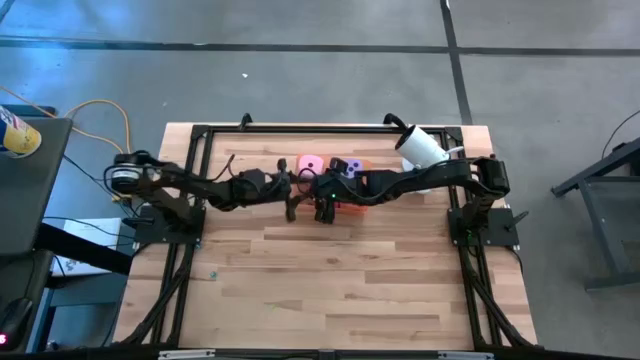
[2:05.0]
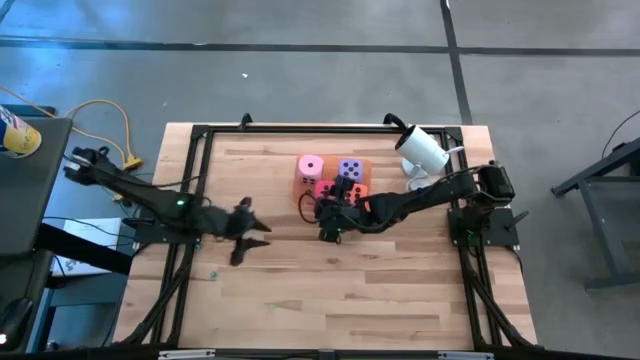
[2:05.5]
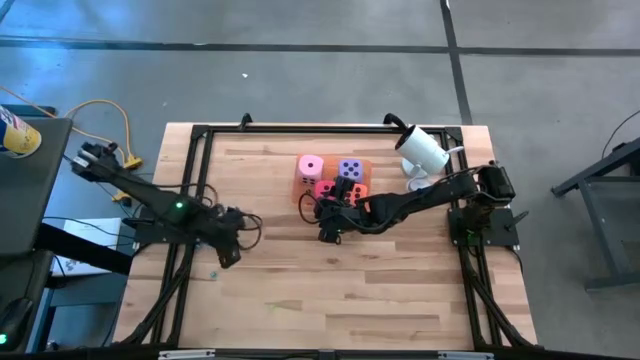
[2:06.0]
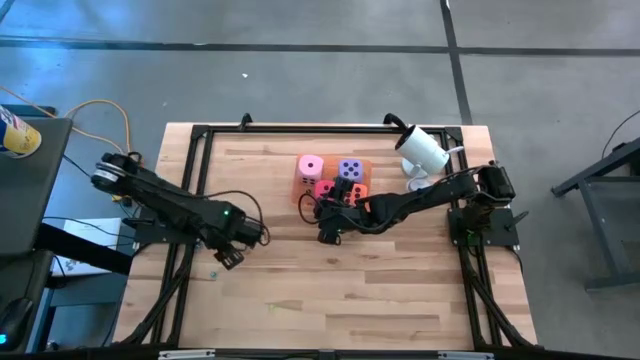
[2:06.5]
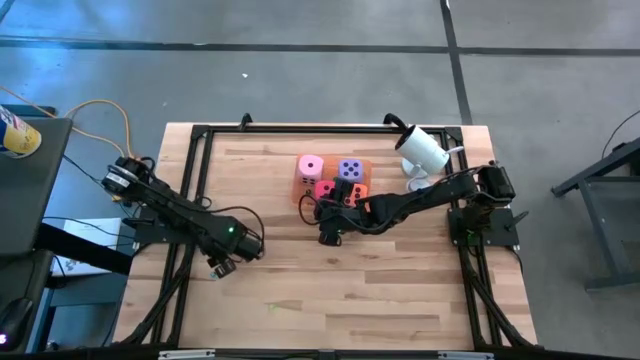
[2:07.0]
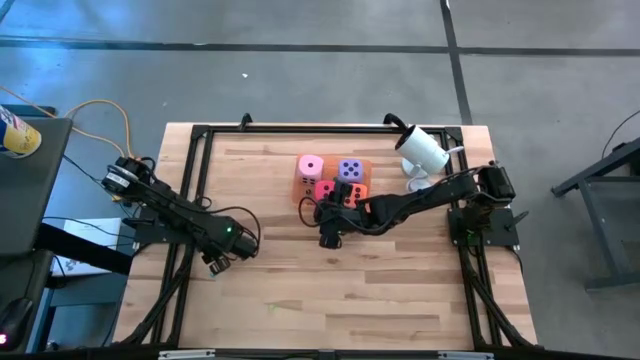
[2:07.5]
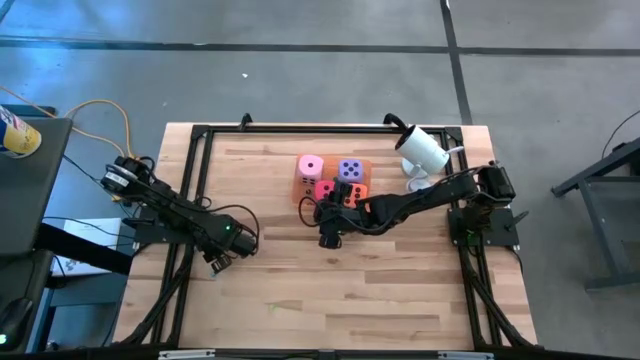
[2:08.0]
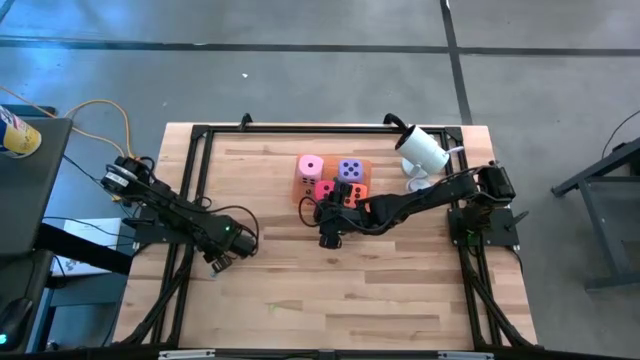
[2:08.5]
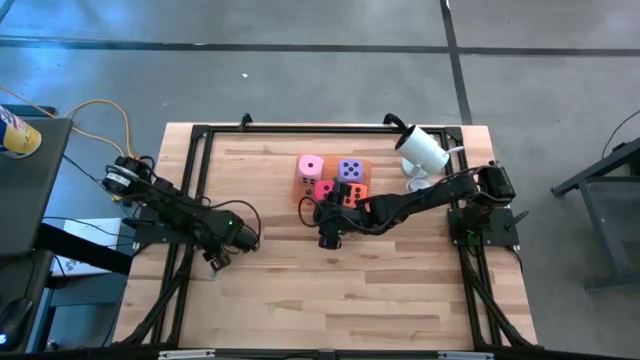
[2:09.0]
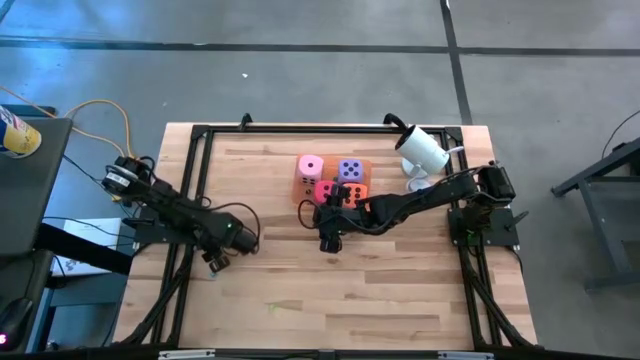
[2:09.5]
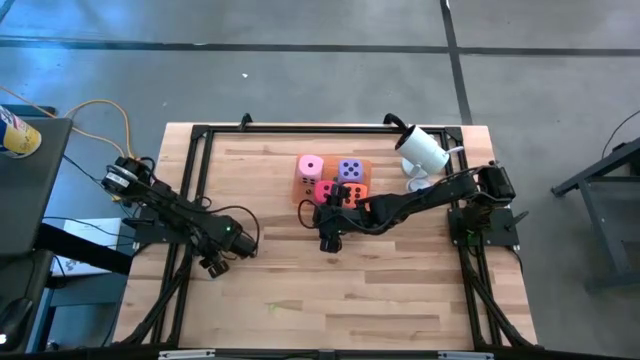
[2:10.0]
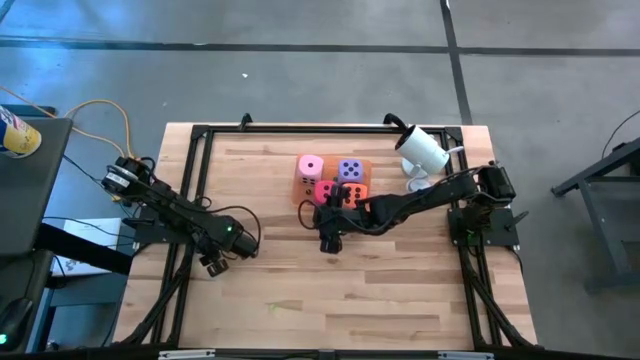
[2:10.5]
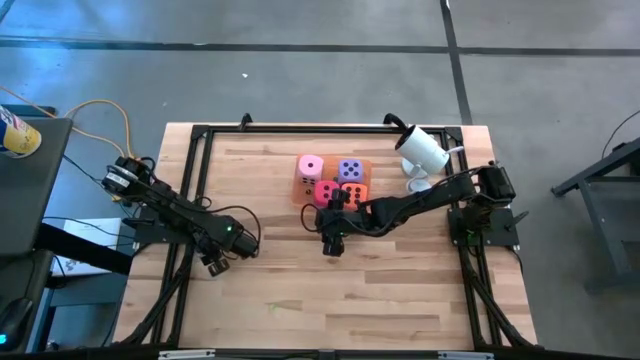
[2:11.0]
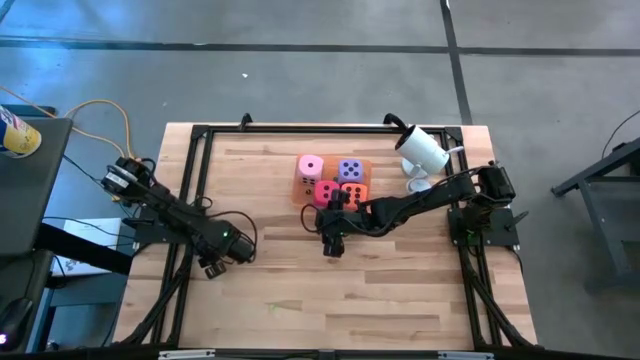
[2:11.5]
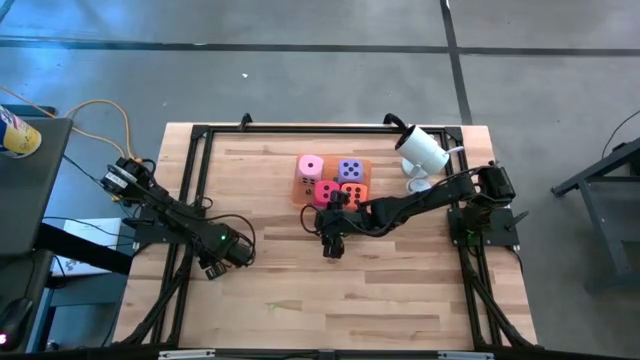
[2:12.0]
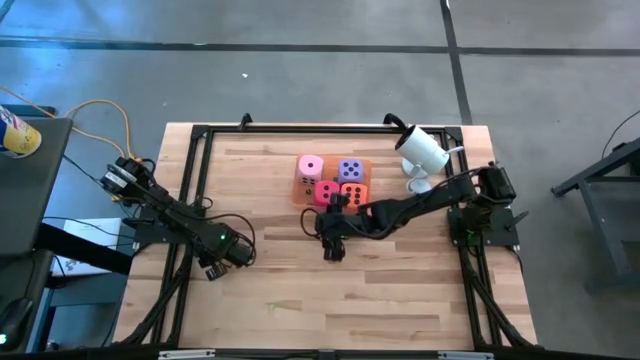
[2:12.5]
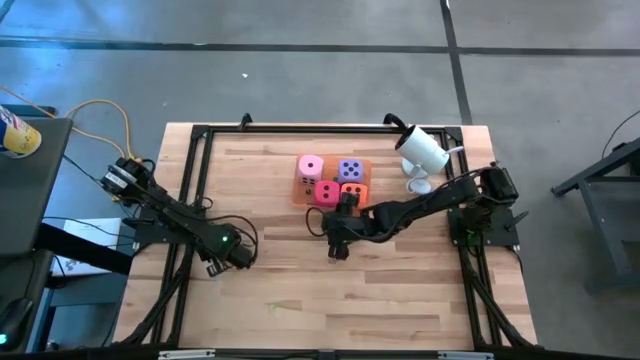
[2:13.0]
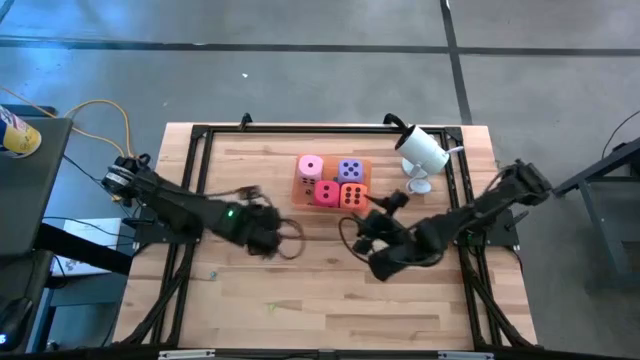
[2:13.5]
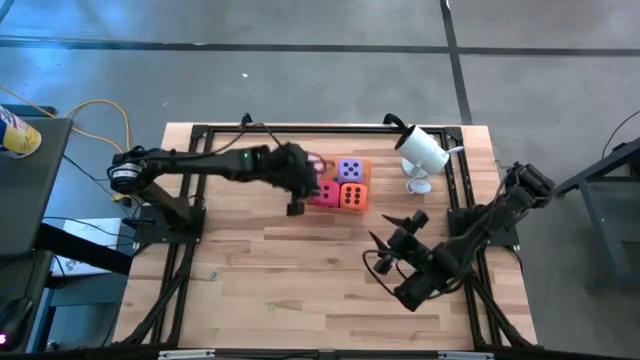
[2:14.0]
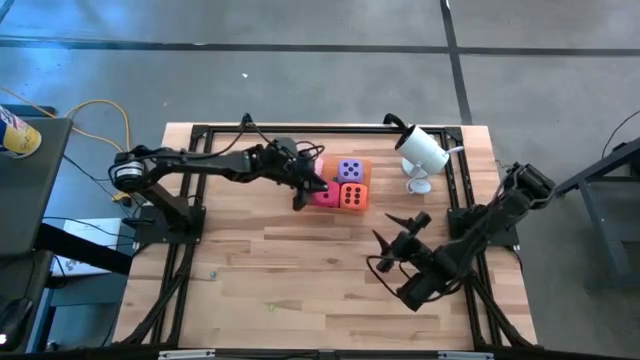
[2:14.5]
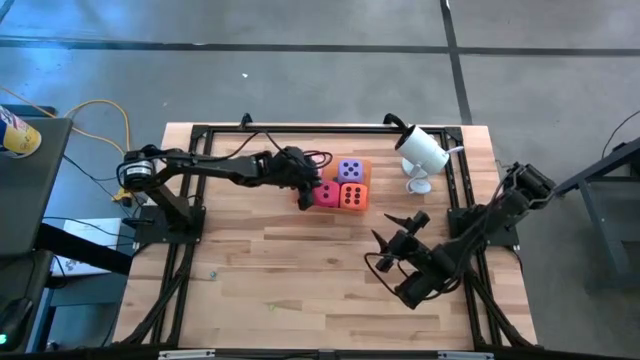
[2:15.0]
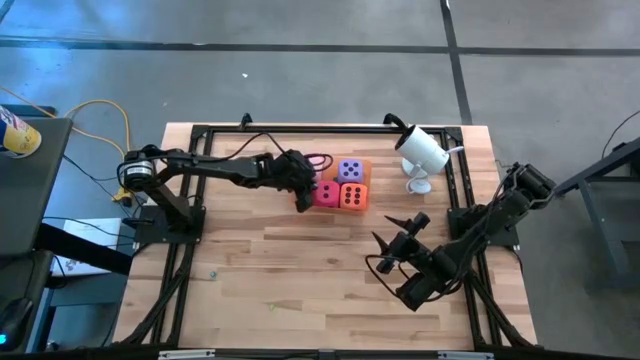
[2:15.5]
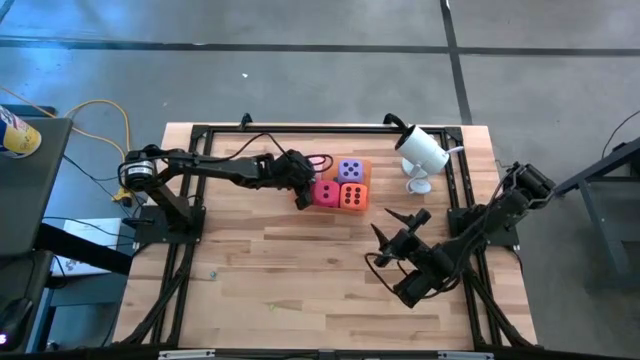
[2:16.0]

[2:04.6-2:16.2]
Task: Pick & Place Dice
Put the small blue die into the orange bin

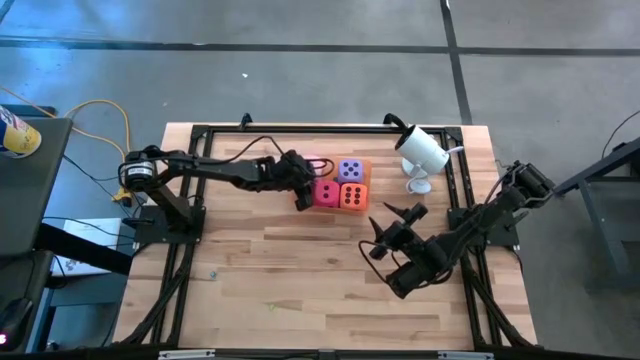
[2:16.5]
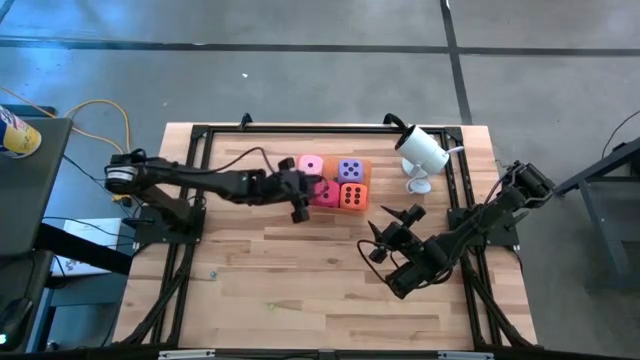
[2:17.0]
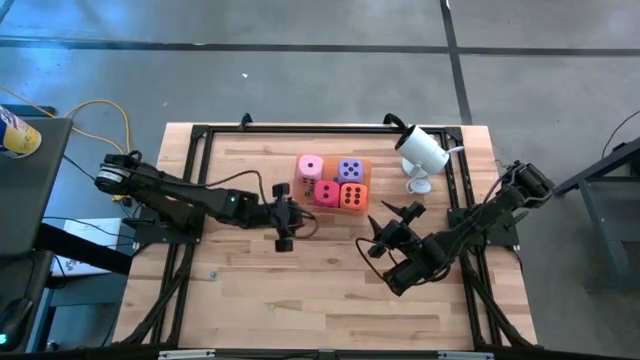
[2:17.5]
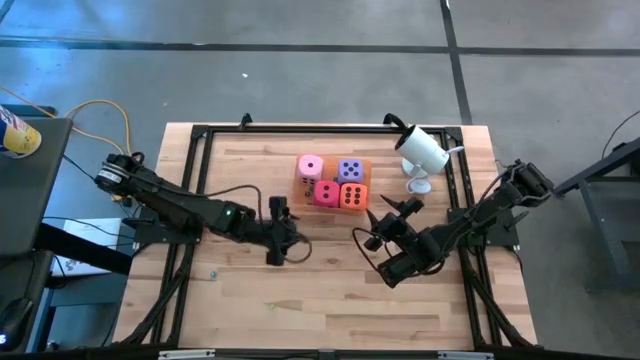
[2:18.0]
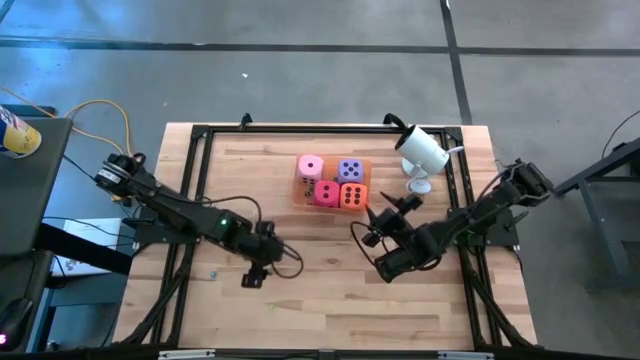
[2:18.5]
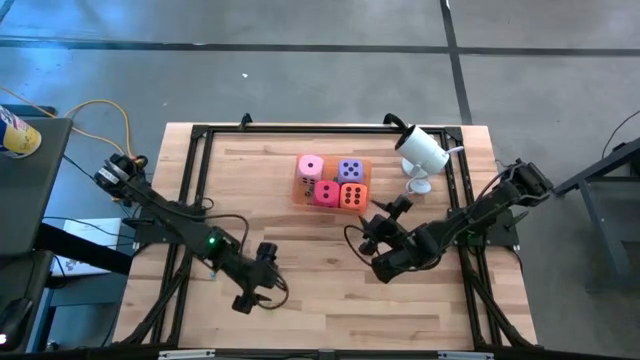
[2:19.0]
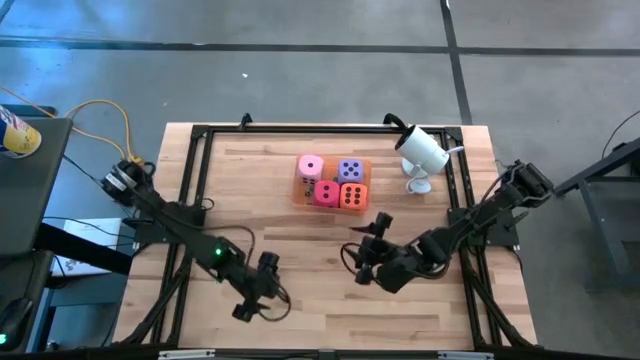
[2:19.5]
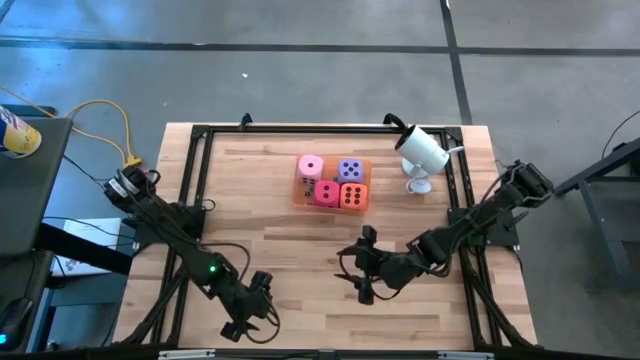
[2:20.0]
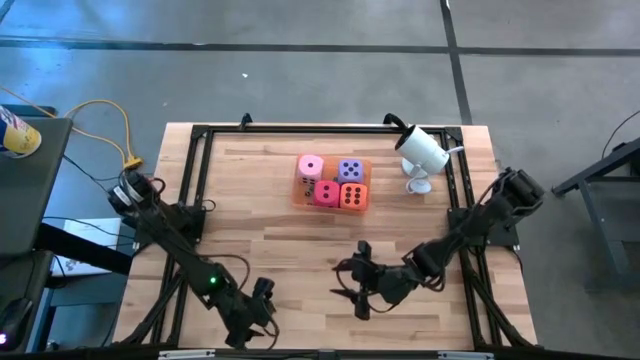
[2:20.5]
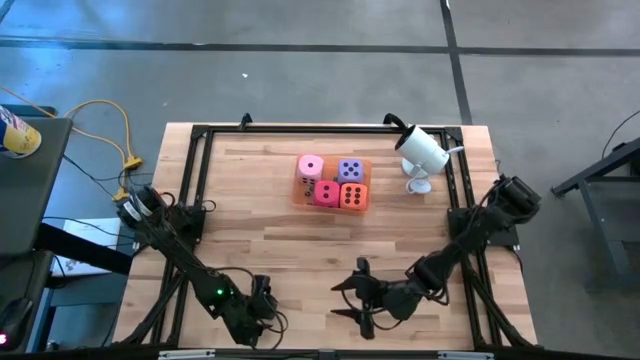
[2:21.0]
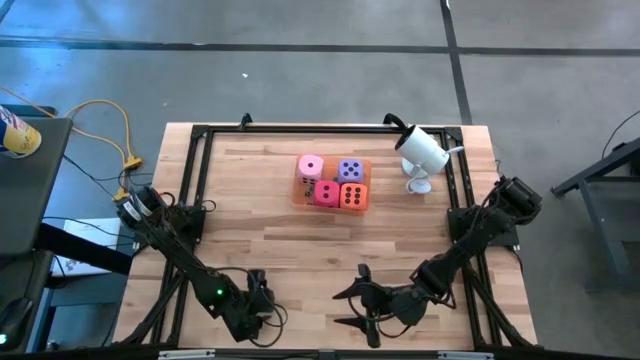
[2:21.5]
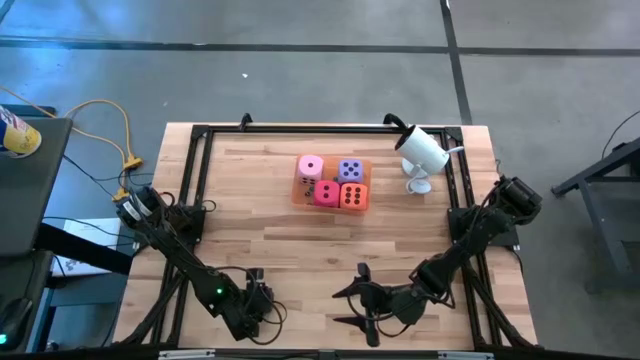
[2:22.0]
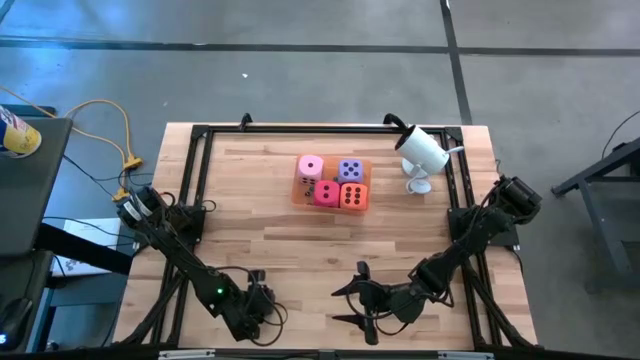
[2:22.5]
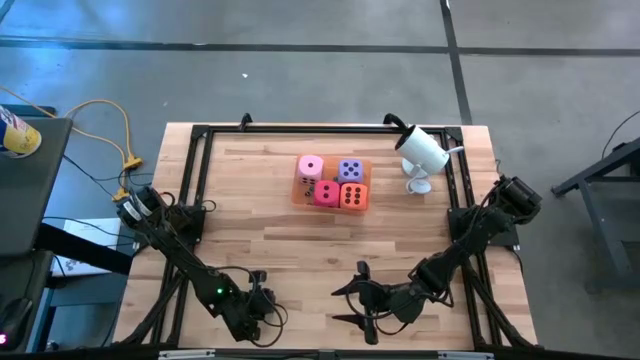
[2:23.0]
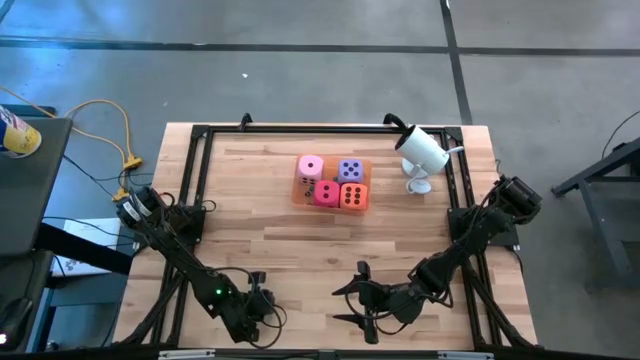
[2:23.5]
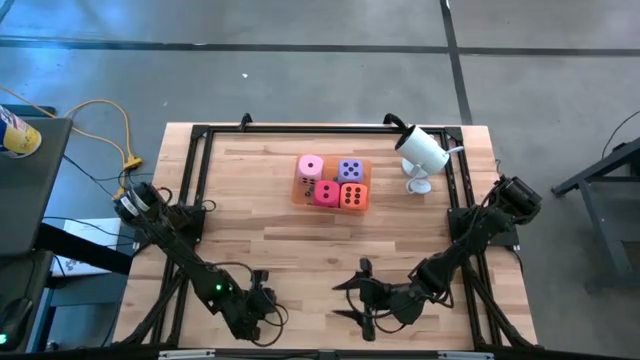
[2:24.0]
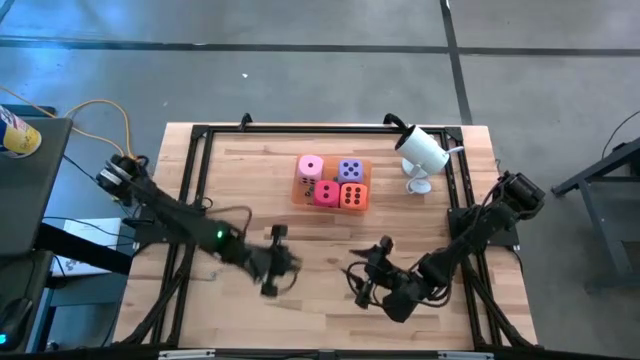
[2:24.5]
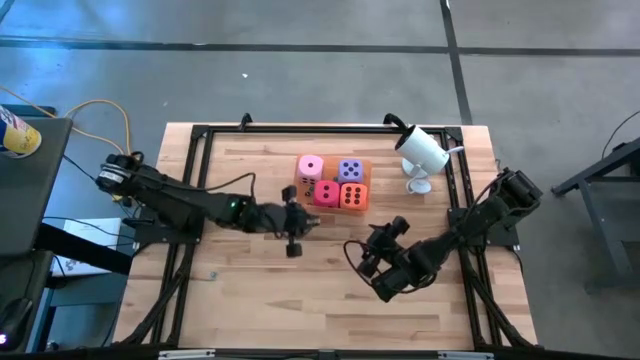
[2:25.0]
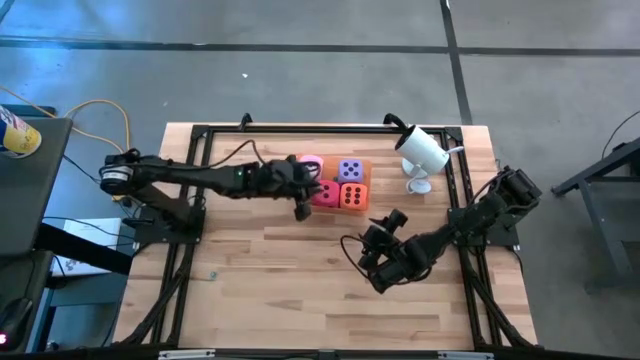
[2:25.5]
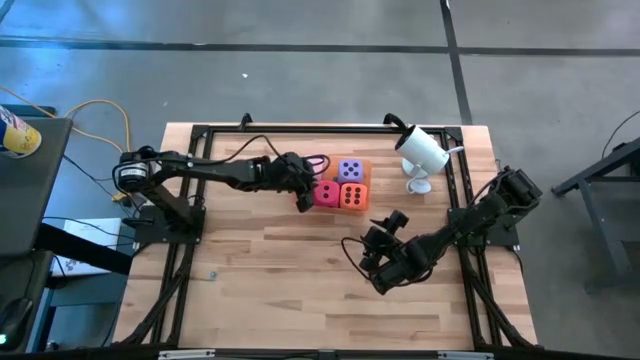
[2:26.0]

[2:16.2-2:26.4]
Put the small green die into the orange bin
